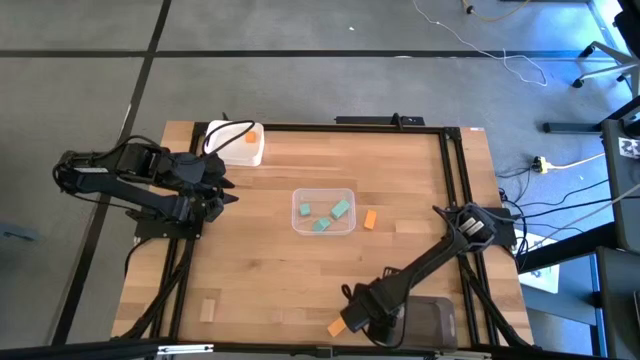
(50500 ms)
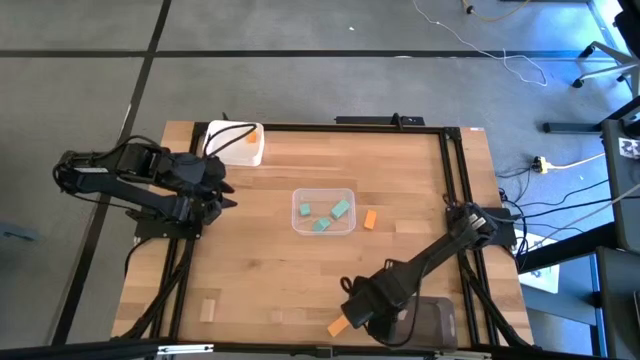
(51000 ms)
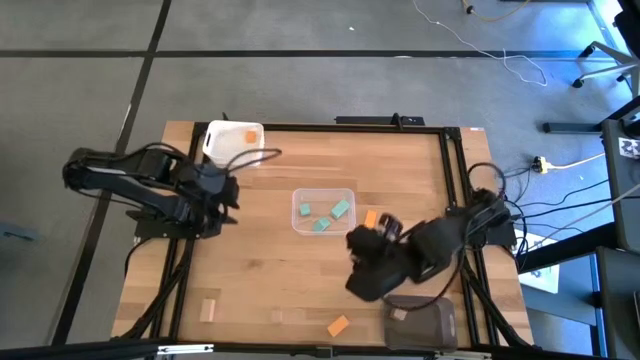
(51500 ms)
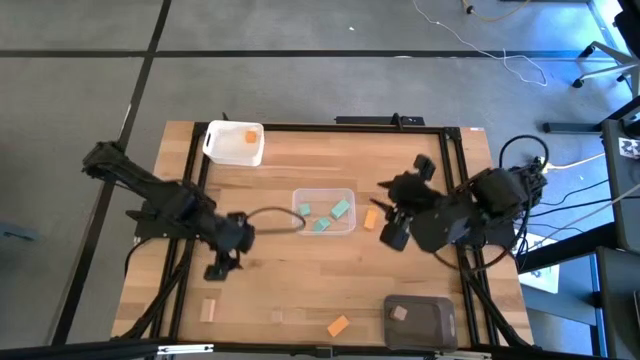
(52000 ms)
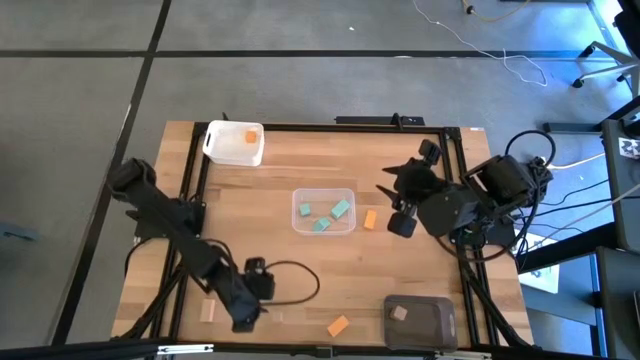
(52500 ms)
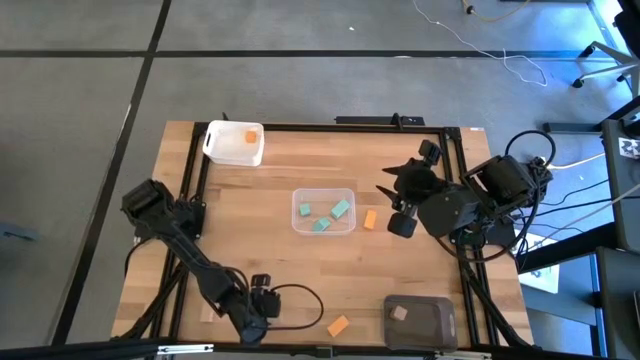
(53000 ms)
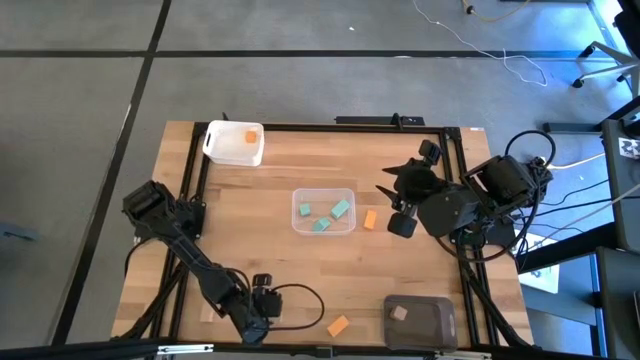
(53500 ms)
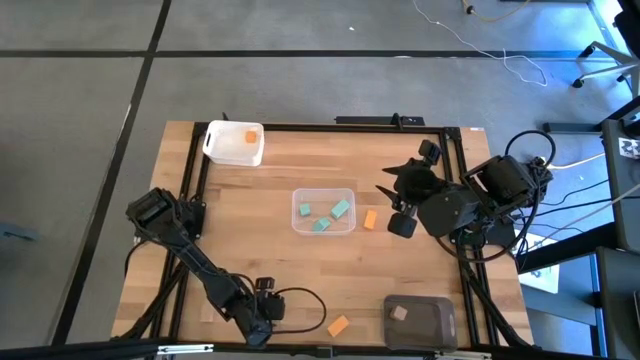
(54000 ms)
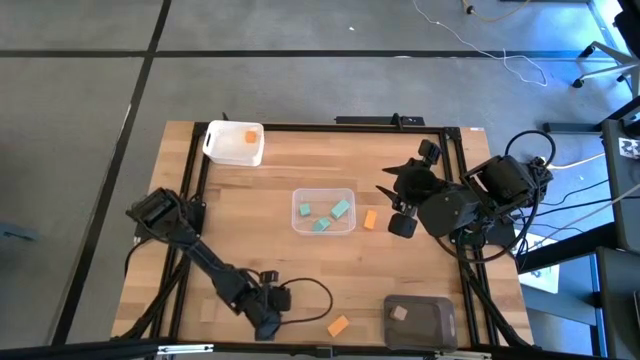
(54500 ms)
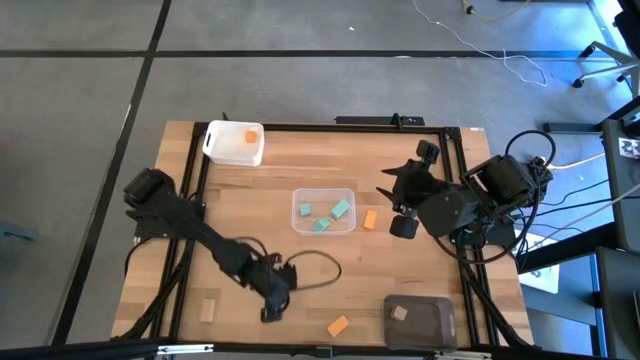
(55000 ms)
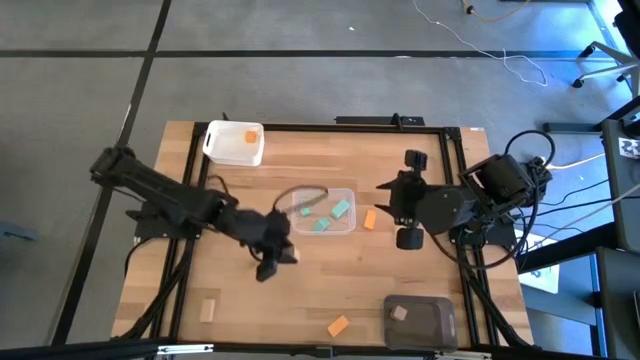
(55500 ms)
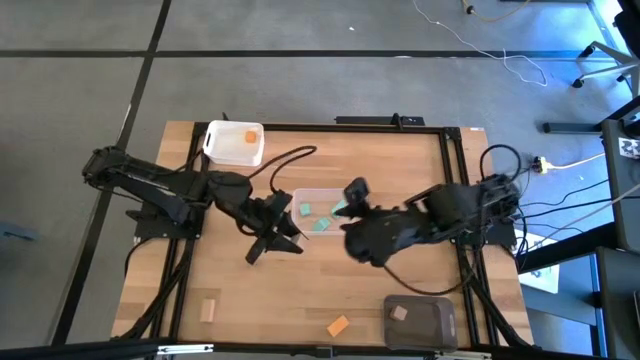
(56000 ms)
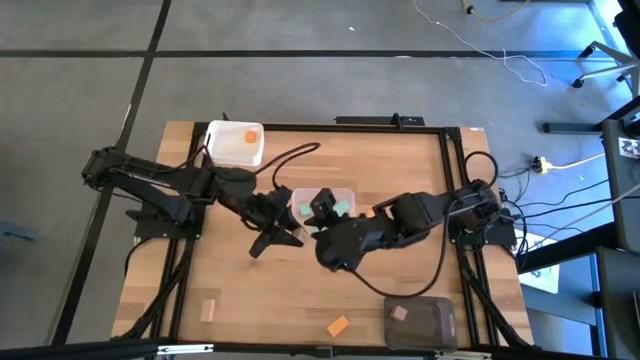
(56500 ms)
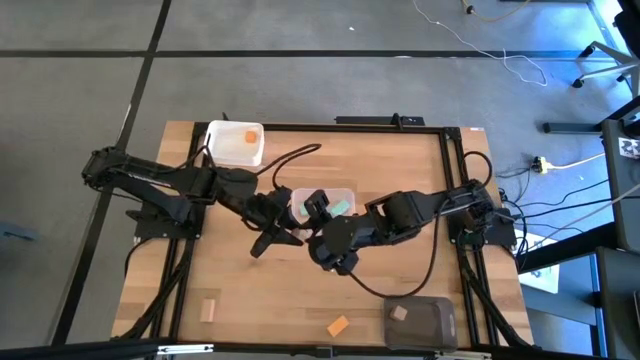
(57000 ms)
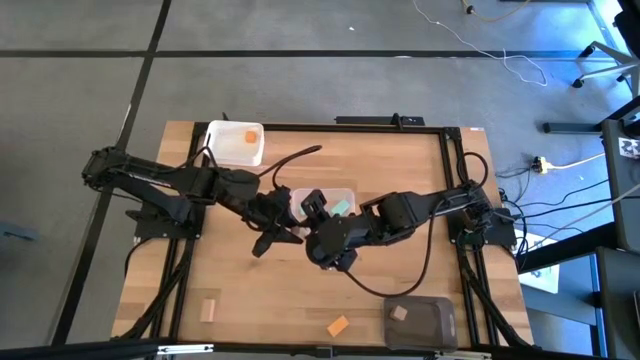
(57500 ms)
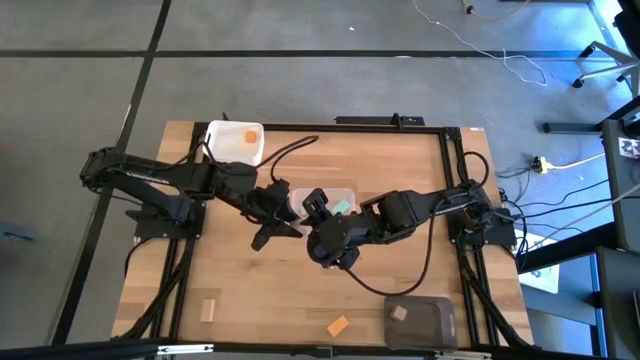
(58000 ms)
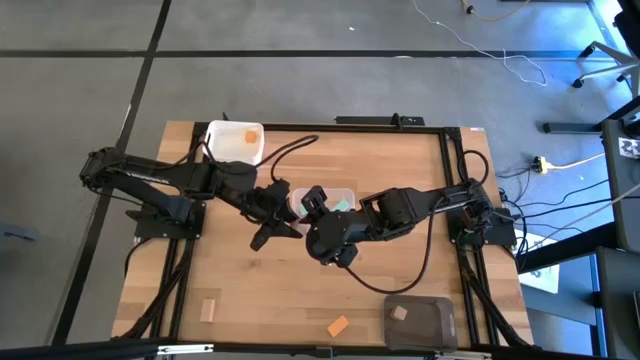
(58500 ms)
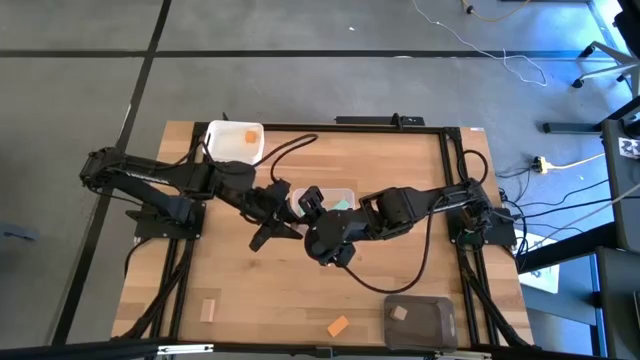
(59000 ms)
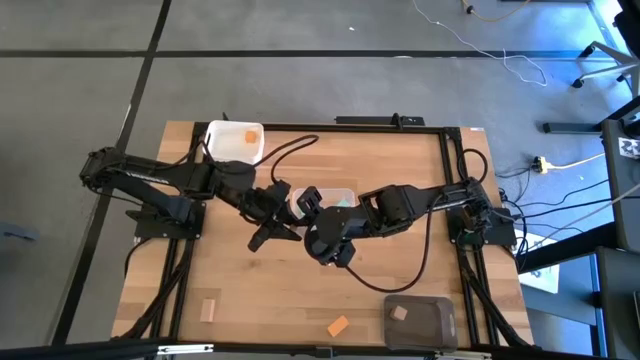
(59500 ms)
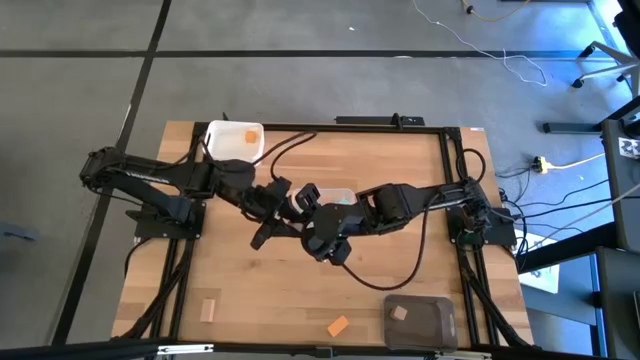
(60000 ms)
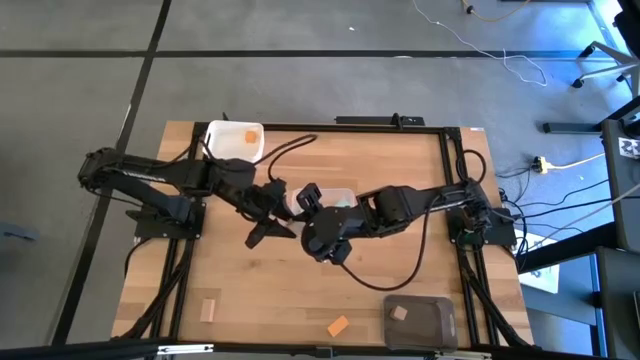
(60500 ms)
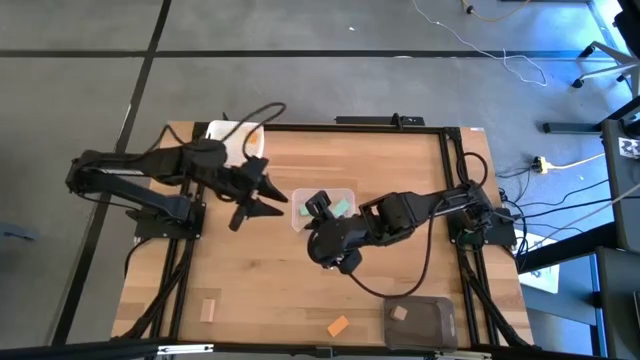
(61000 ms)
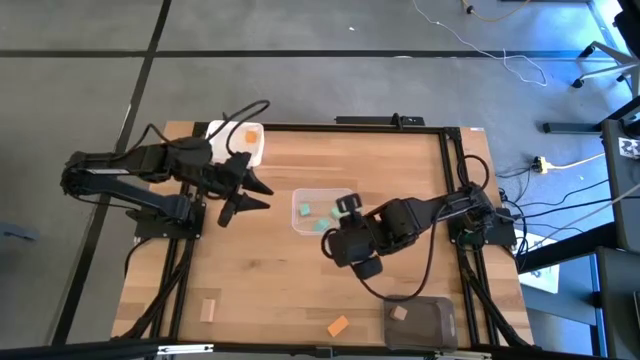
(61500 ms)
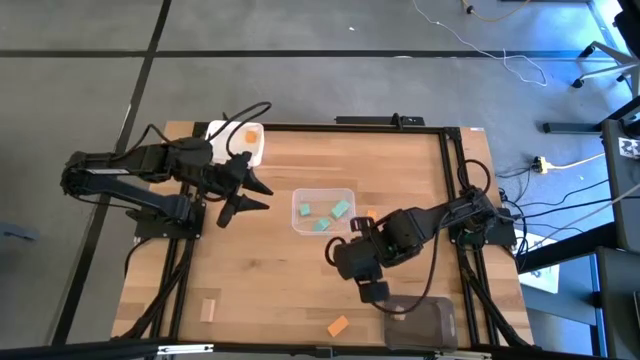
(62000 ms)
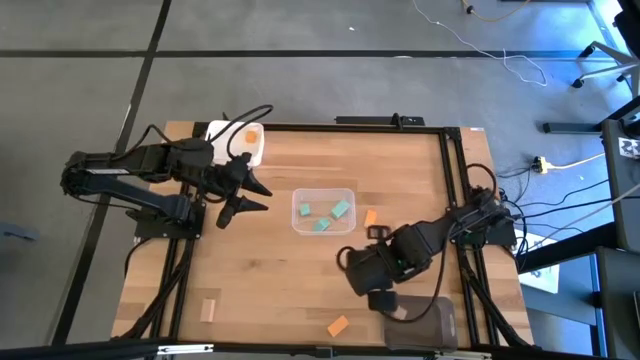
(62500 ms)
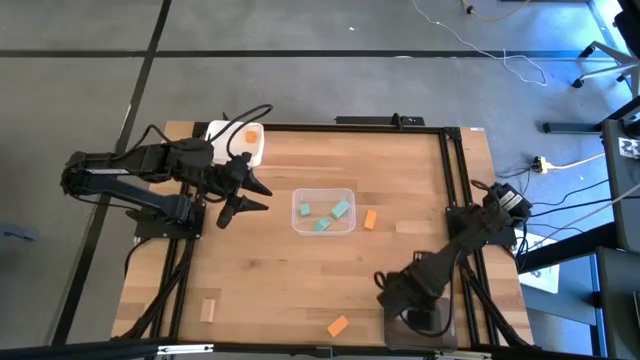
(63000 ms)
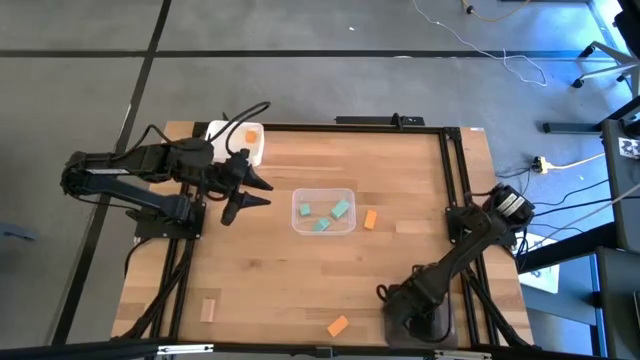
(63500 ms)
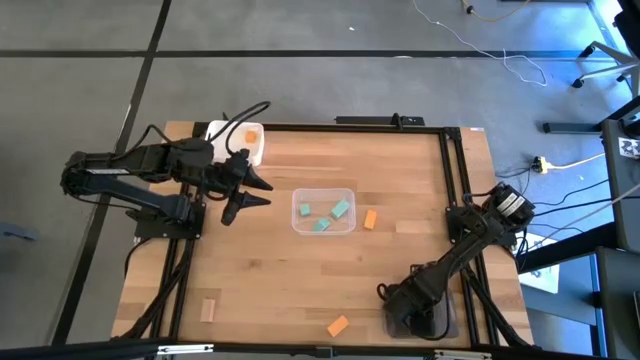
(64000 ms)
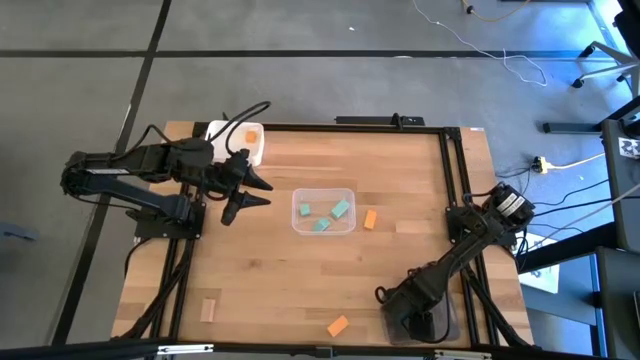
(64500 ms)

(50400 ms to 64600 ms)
Task: Sort & place blocks by color
Put the right brown block into the black bin

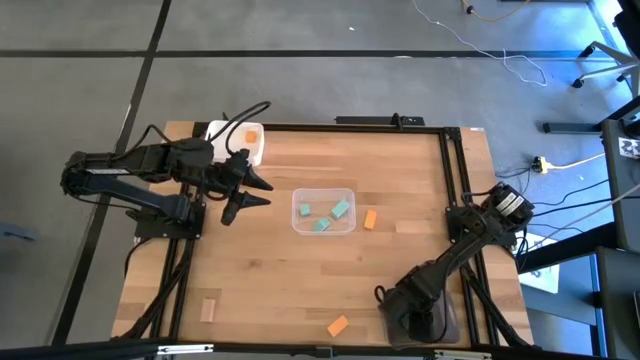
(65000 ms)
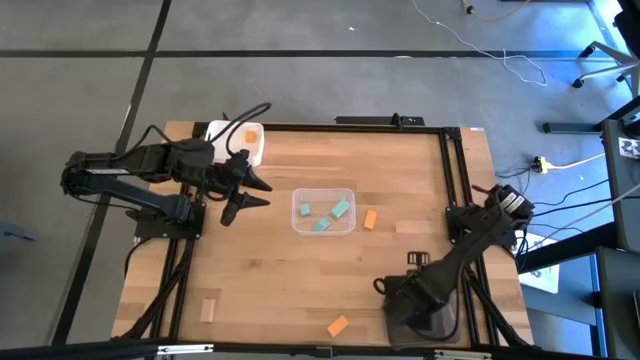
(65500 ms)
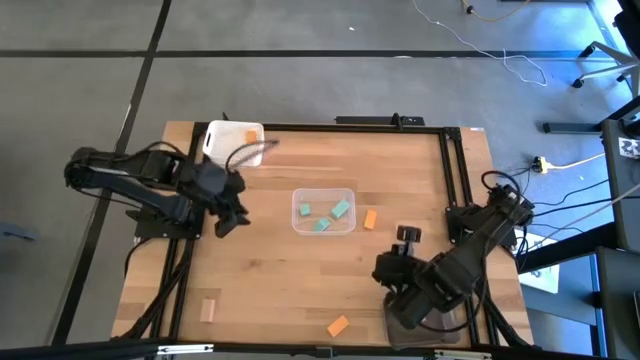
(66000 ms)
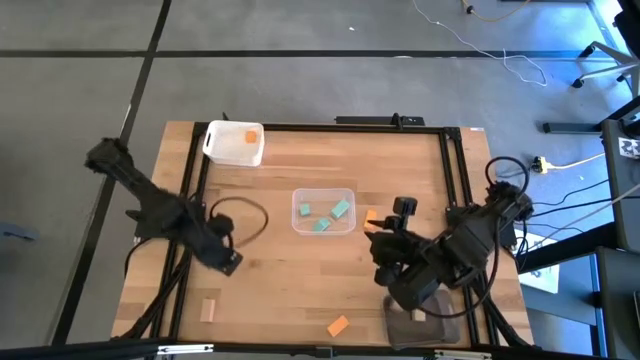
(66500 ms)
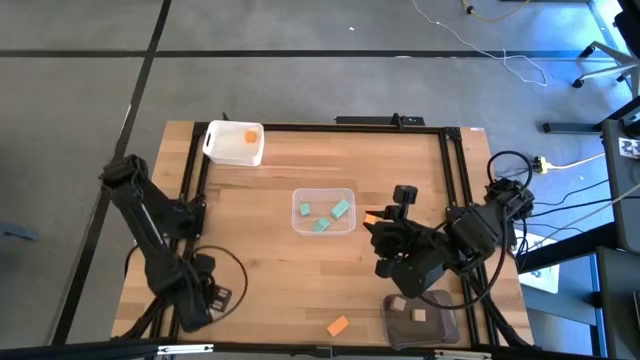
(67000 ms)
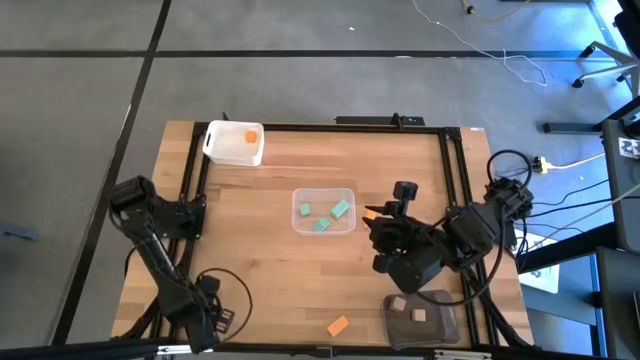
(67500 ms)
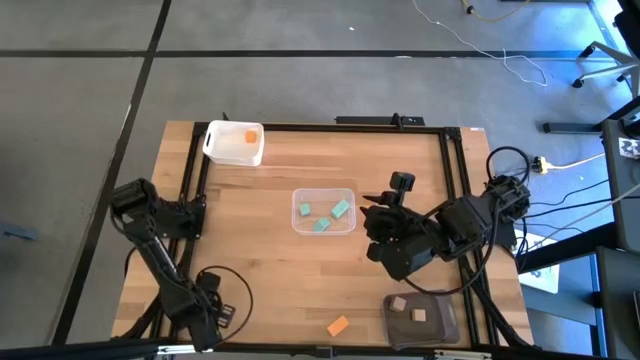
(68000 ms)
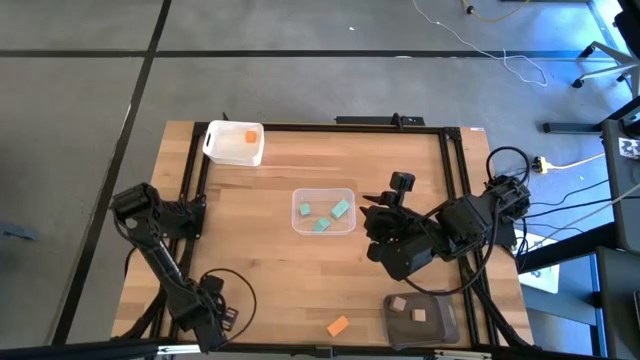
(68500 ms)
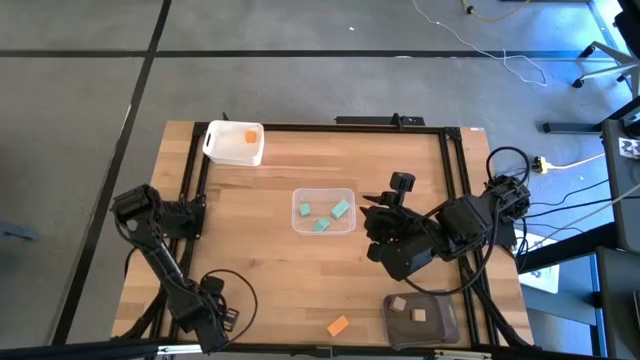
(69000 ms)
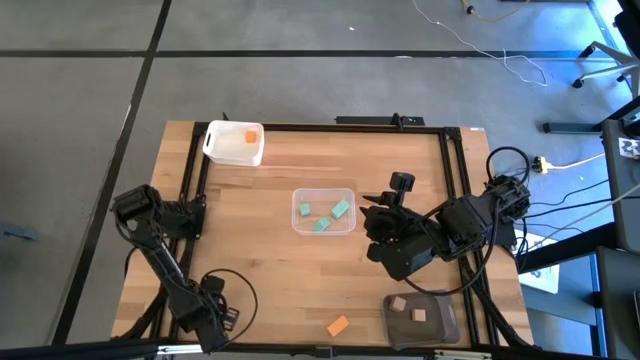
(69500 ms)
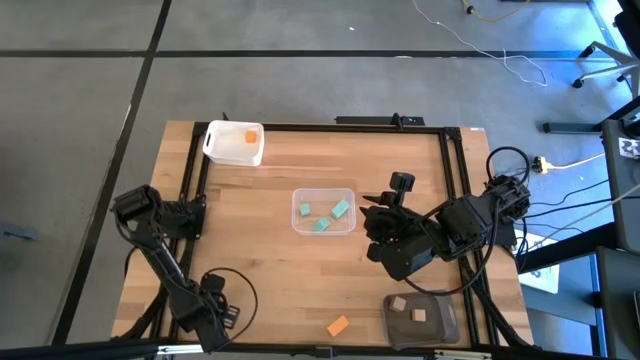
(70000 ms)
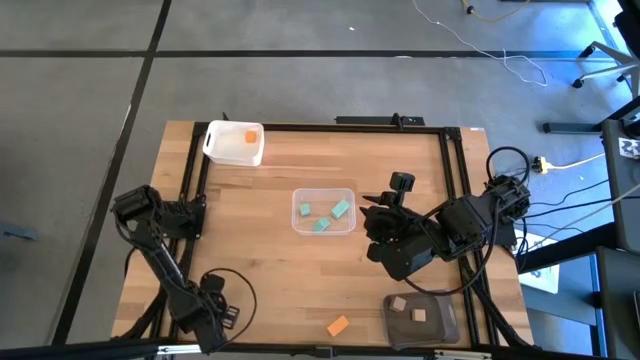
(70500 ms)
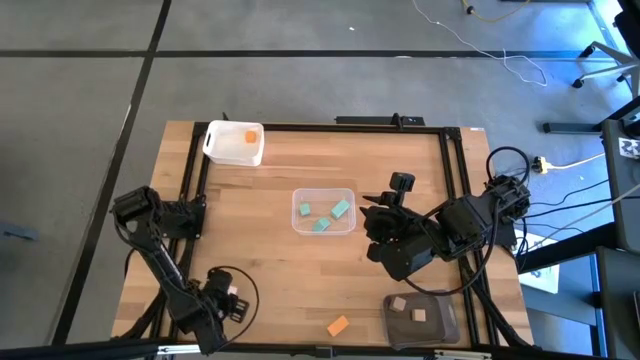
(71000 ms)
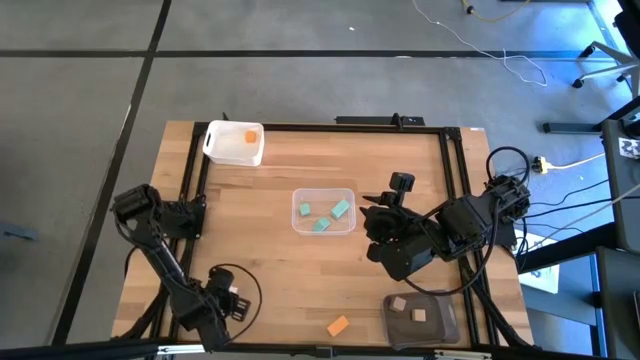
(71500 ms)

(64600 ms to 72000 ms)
Put the brown block into the black bin

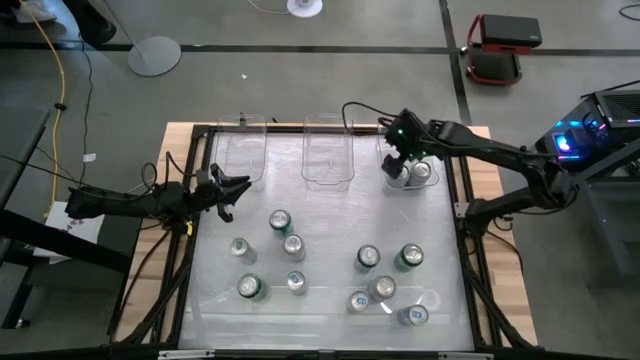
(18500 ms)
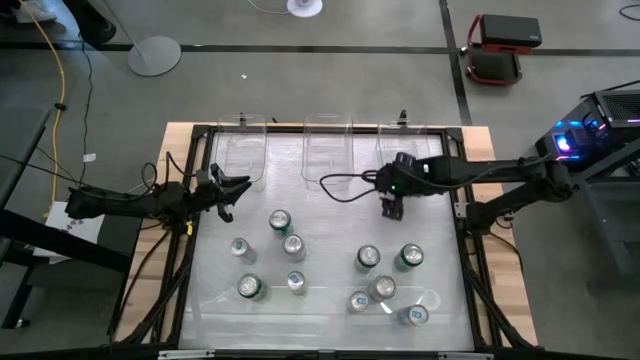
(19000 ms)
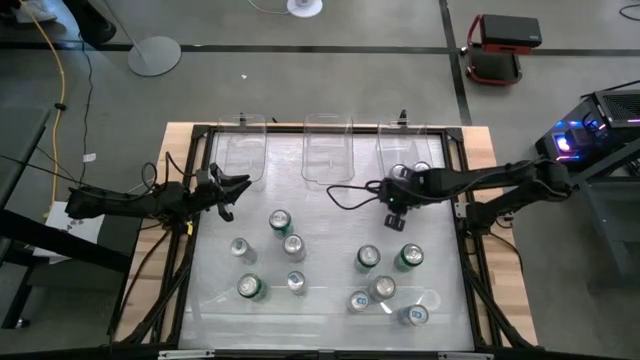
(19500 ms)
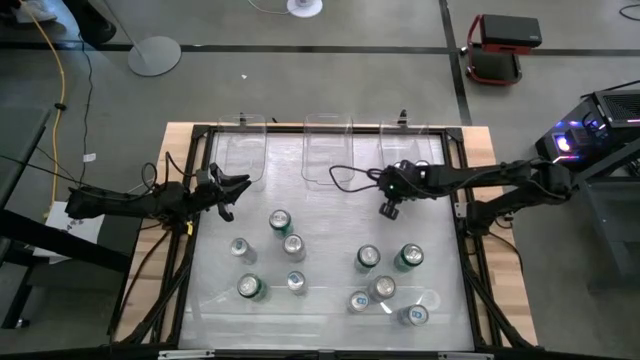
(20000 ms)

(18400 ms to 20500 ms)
Task: Sort soda cans
Adjust the right transparent bin
